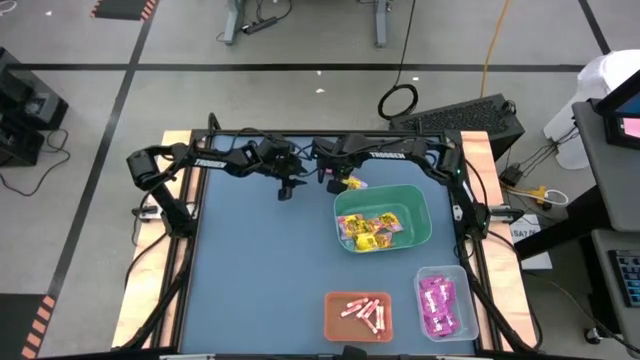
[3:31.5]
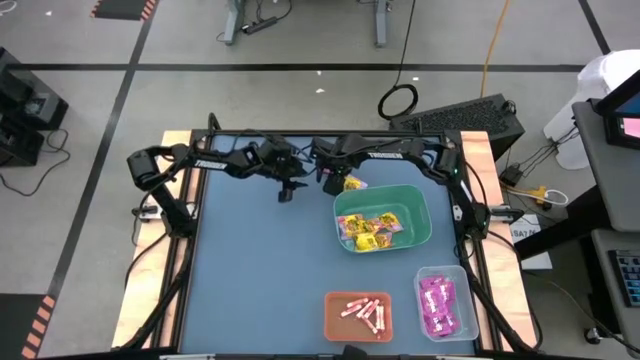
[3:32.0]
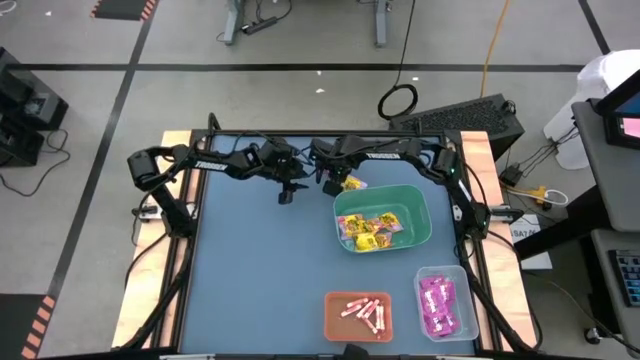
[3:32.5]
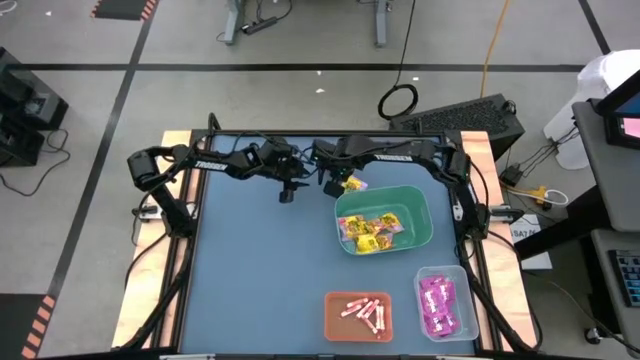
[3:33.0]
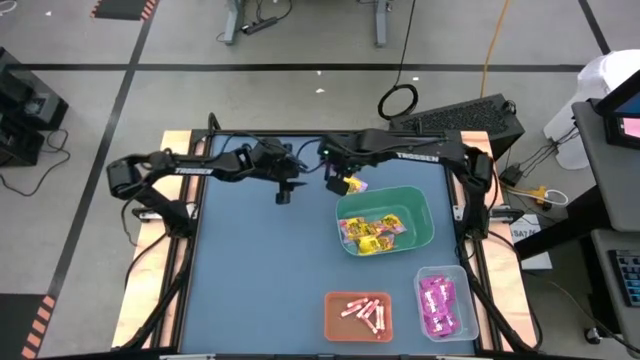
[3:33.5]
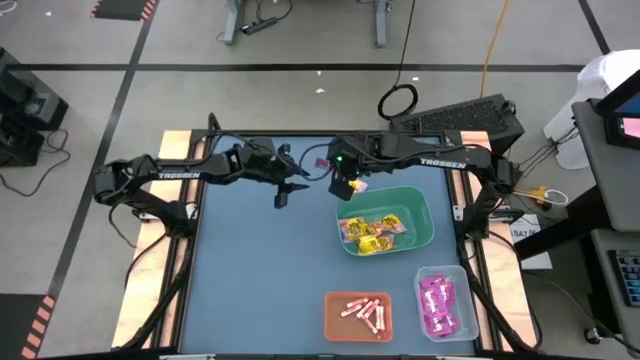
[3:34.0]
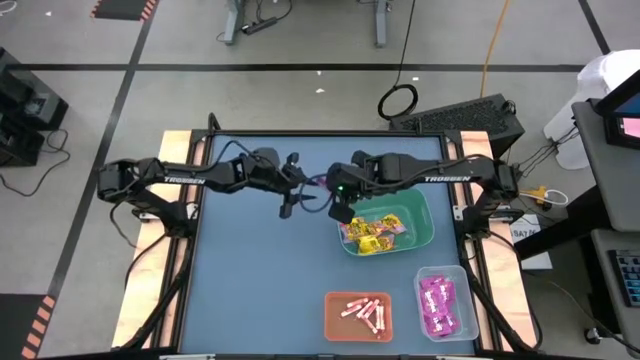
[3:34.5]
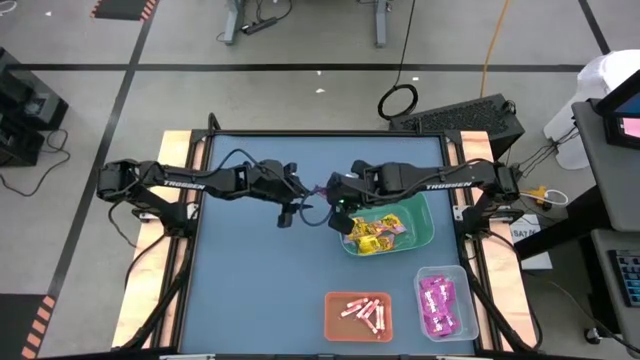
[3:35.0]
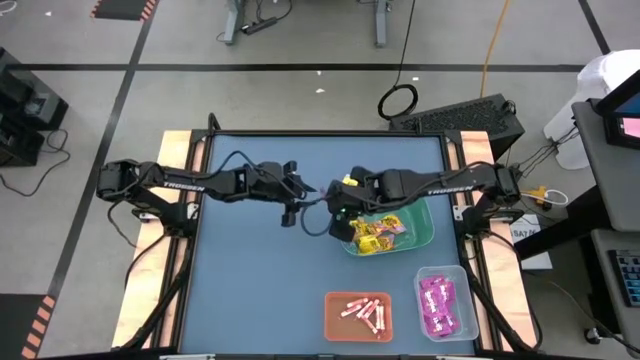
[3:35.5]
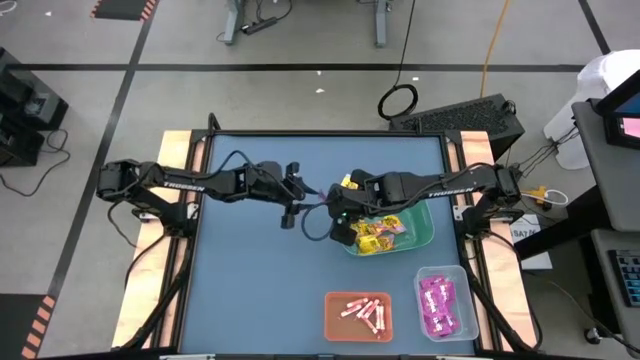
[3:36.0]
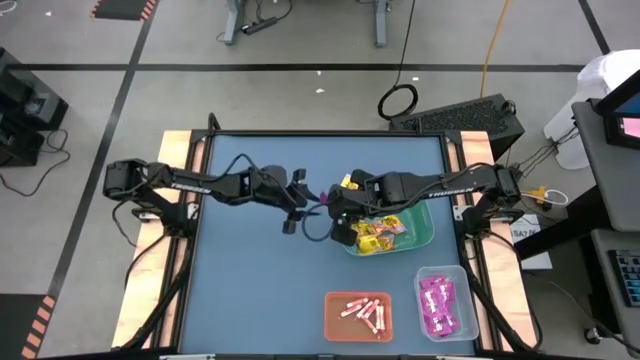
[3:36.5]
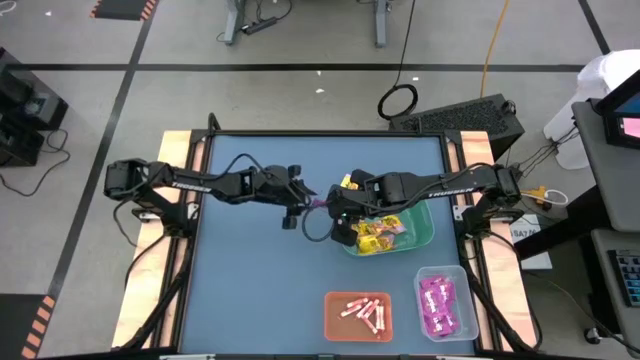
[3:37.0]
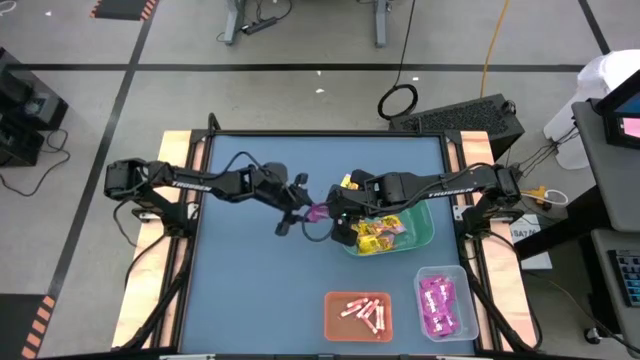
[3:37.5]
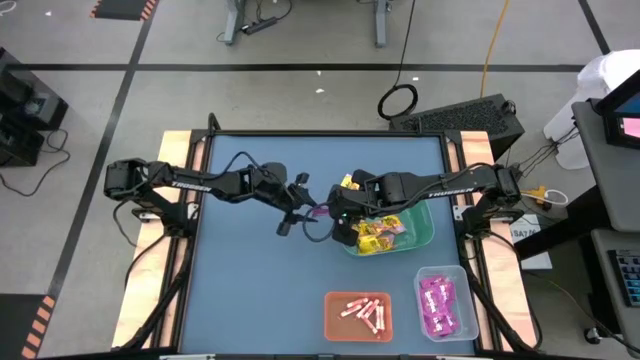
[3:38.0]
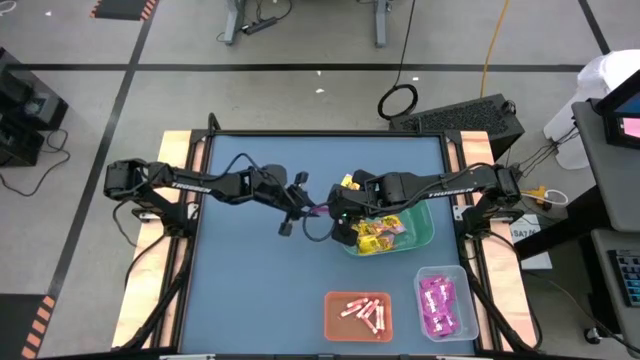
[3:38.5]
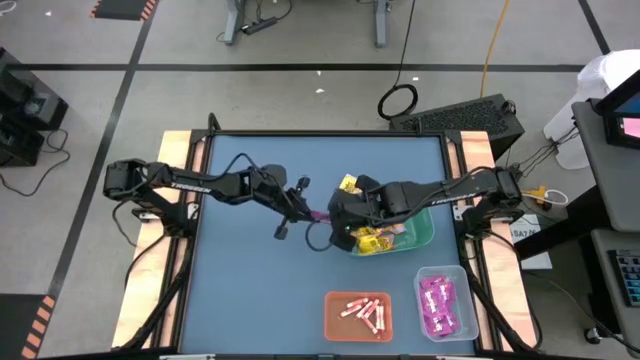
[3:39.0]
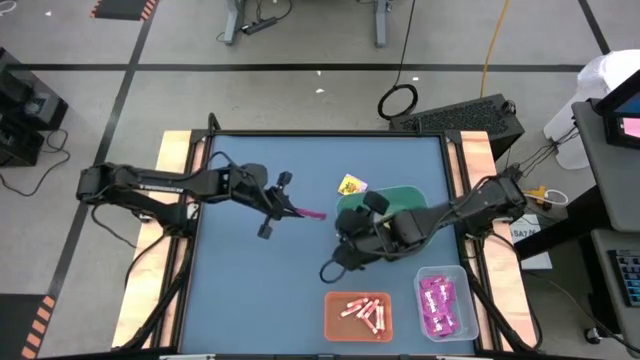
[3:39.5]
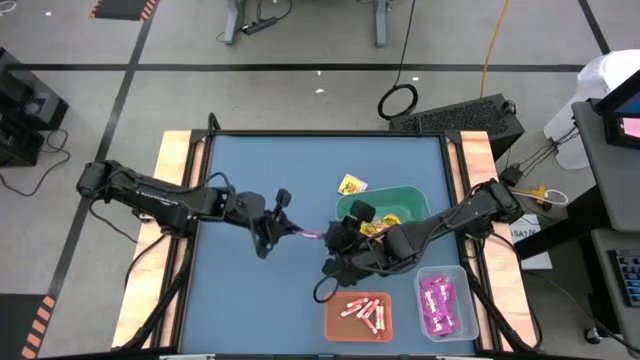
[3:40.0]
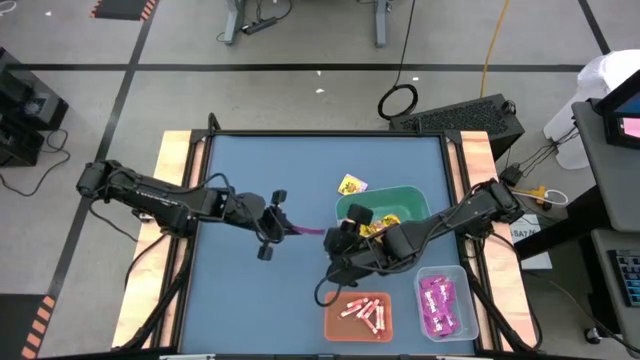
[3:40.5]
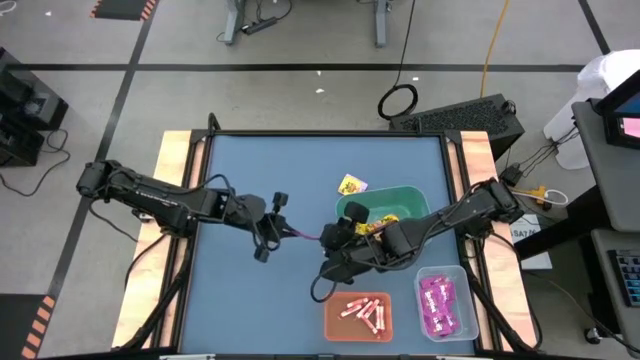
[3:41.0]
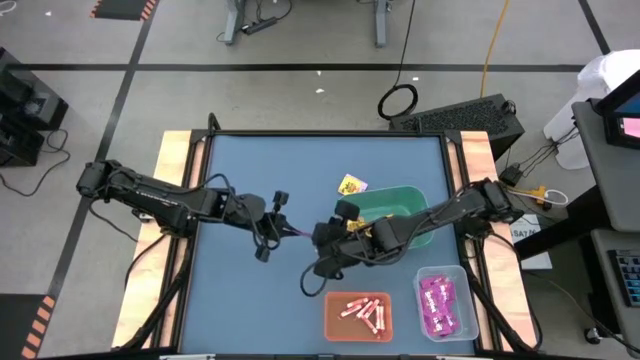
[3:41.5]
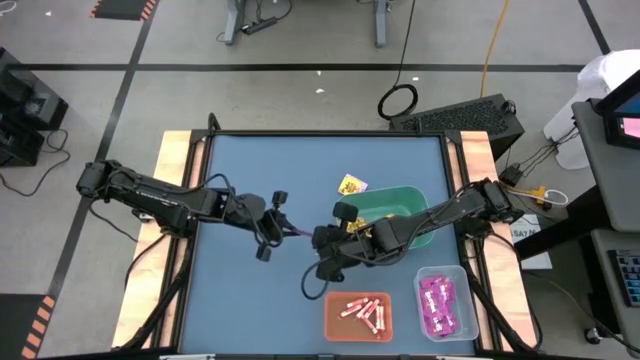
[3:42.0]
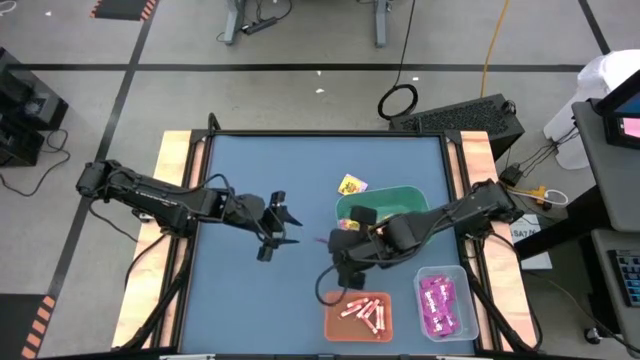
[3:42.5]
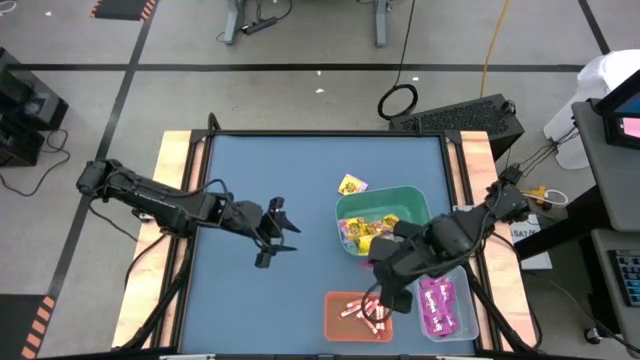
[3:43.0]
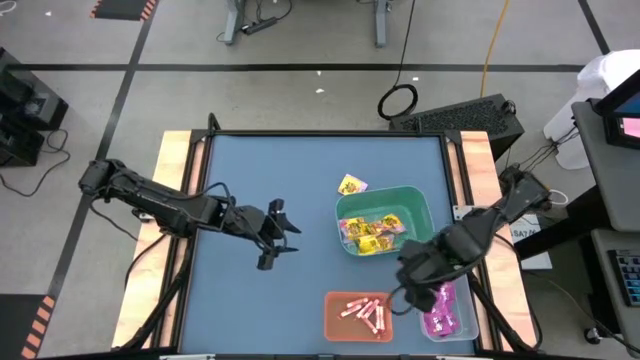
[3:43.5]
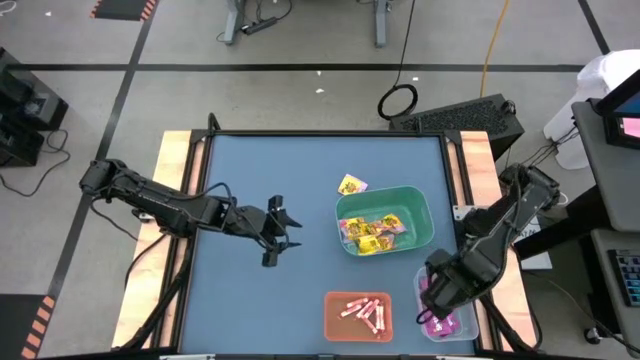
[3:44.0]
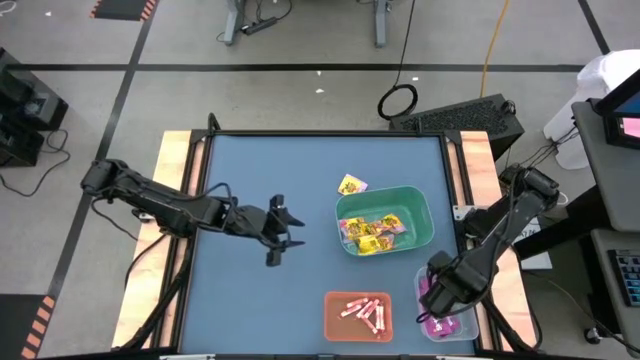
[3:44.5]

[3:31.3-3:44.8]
Task: Sort candy
Put the purple candy pack into the transparent bin

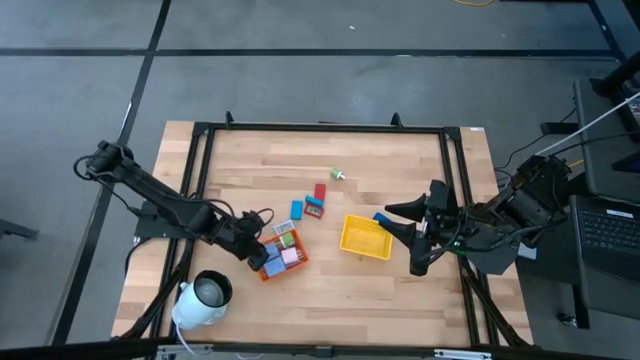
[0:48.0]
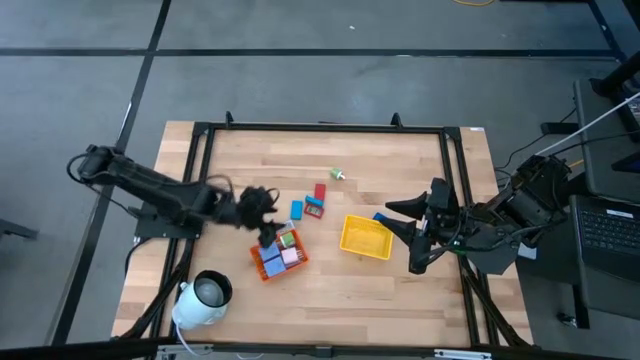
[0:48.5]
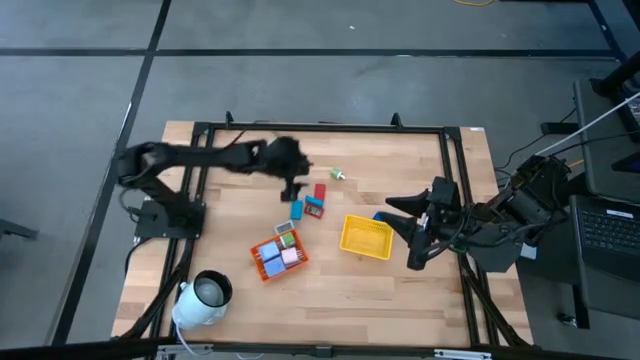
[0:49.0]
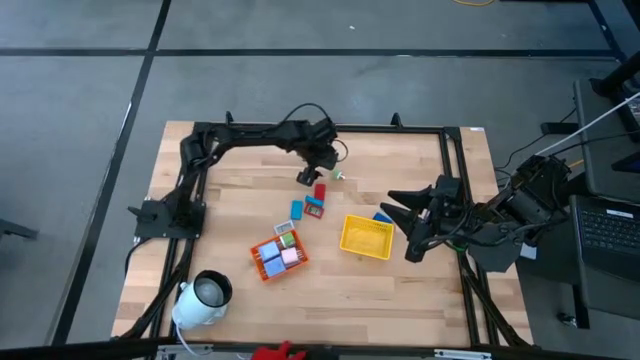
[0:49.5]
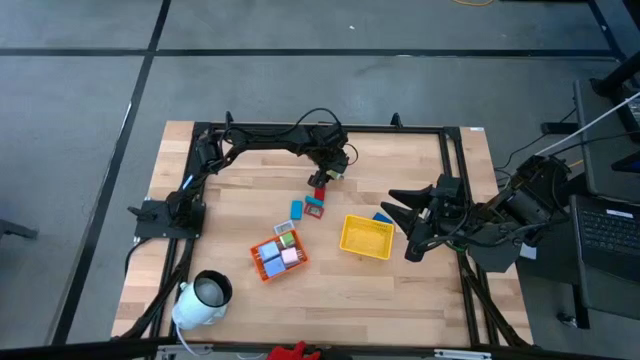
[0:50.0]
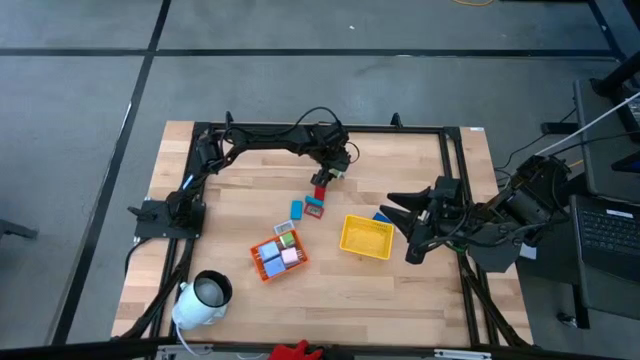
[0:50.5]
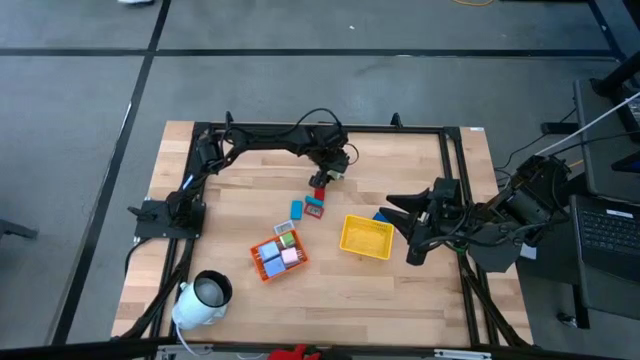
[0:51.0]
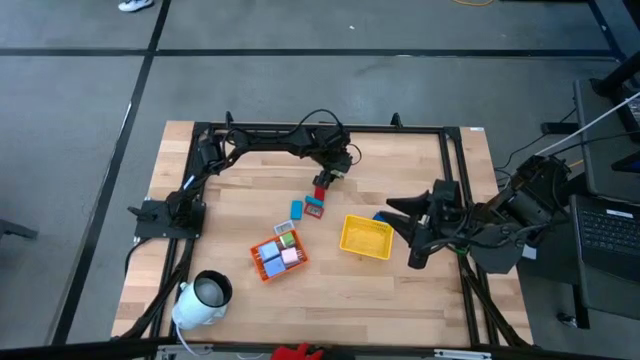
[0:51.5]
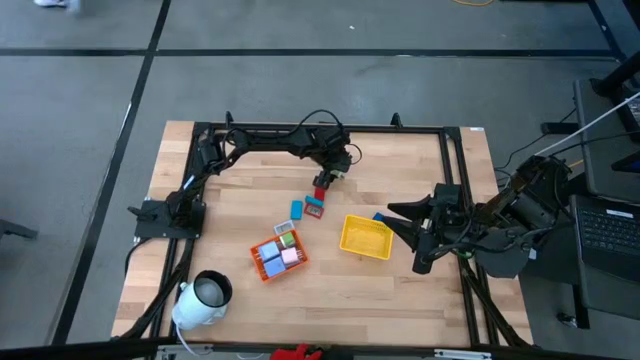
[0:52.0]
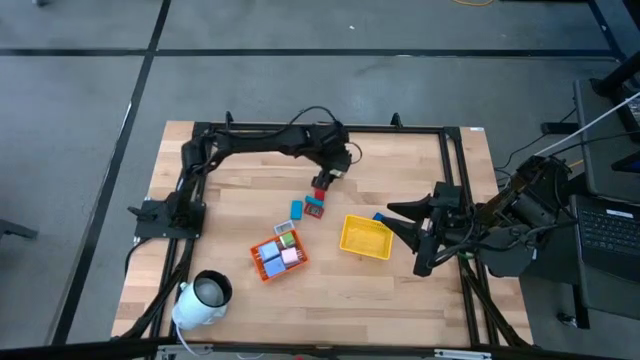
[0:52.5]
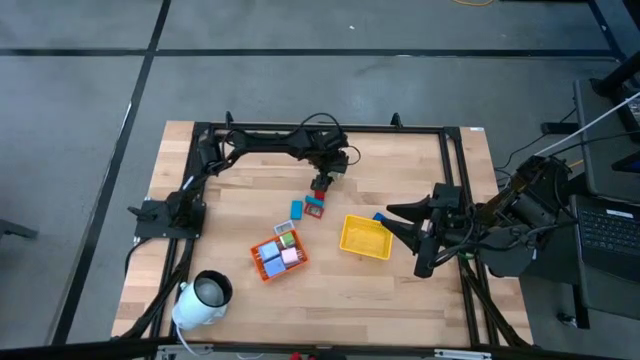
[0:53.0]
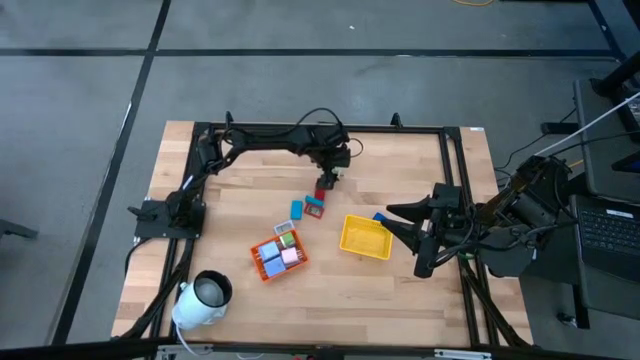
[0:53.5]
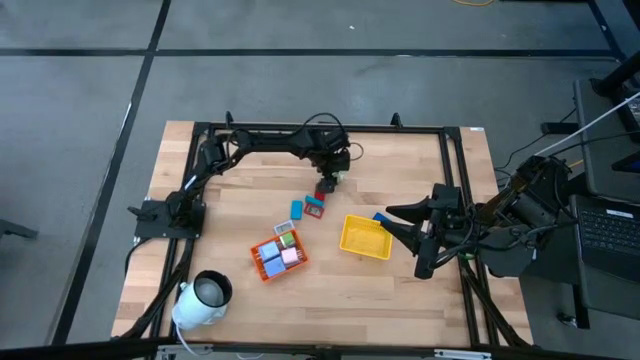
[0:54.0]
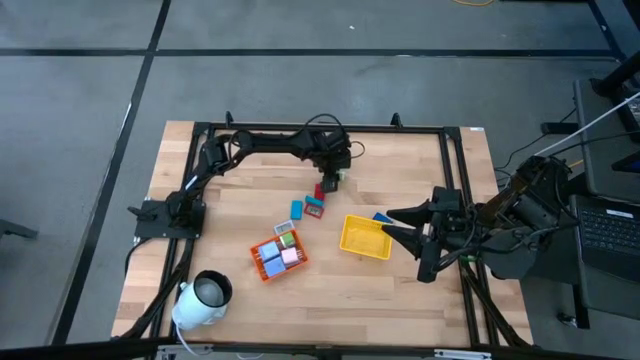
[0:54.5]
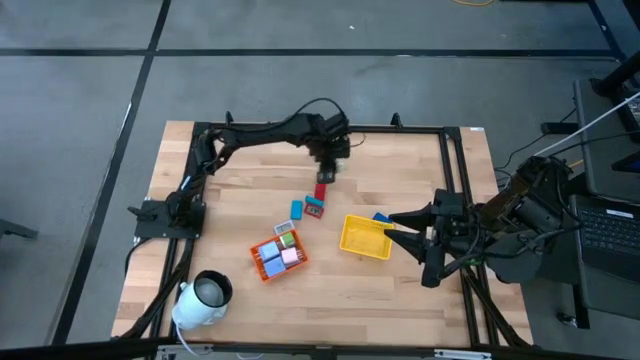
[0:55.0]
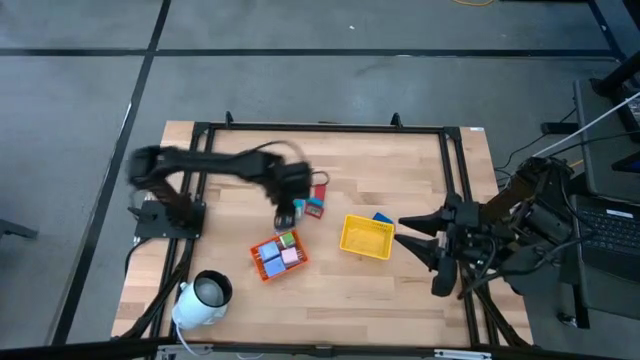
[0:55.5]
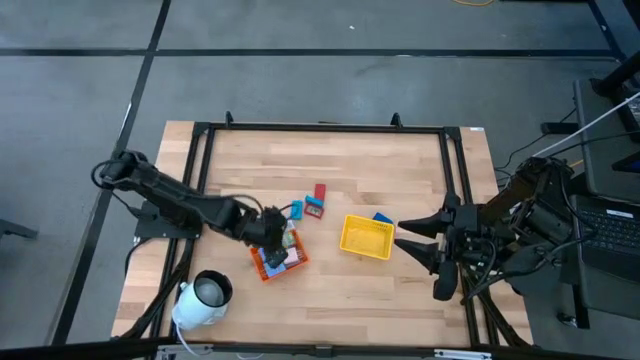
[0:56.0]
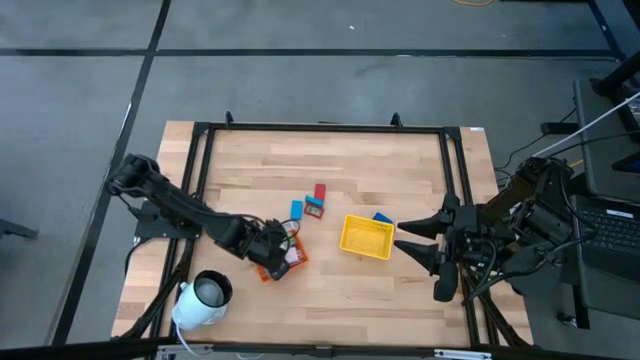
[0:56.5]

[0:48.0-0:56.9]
Task: Pick & Place Office items
Put the green charger adapter into the orange bin
